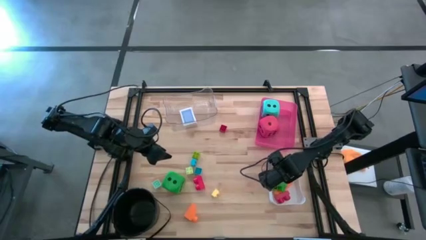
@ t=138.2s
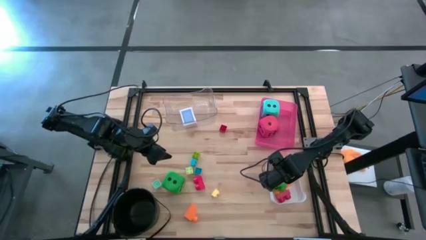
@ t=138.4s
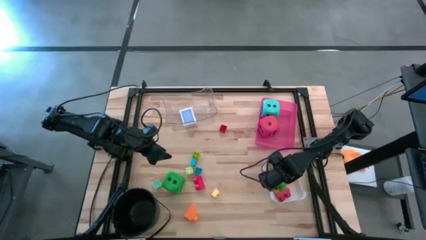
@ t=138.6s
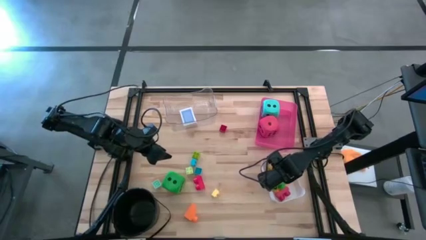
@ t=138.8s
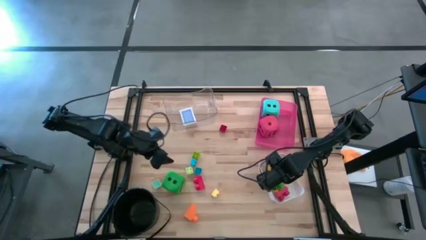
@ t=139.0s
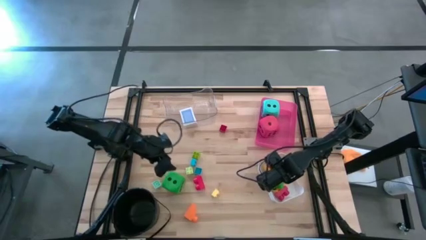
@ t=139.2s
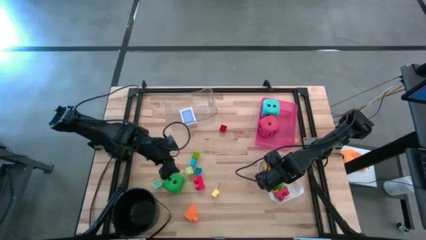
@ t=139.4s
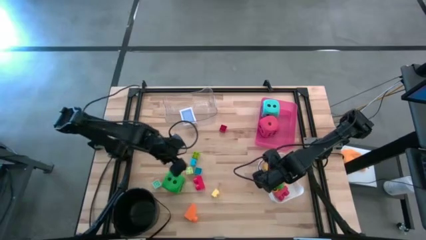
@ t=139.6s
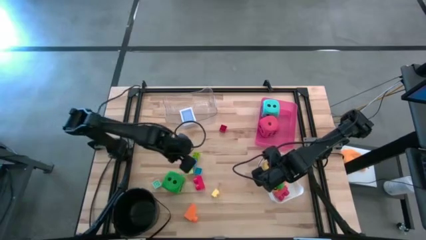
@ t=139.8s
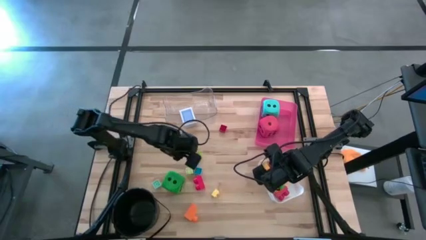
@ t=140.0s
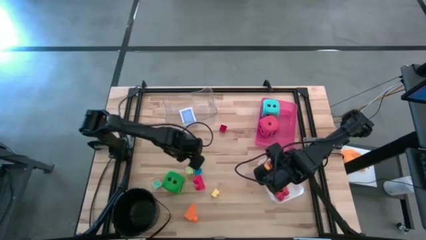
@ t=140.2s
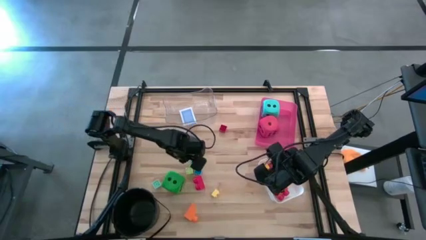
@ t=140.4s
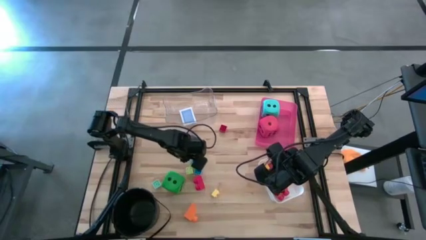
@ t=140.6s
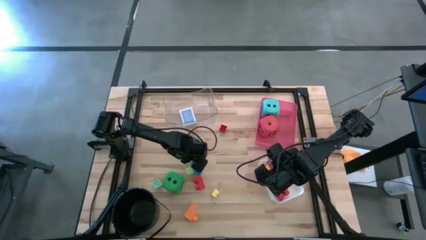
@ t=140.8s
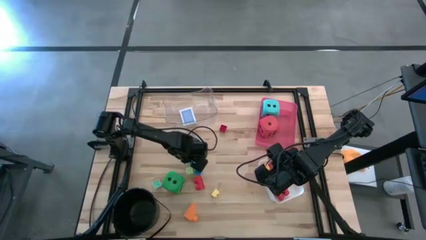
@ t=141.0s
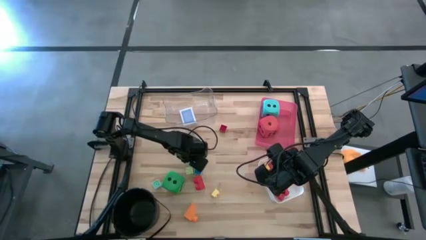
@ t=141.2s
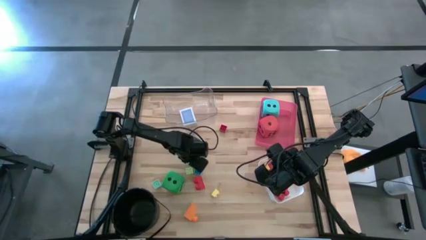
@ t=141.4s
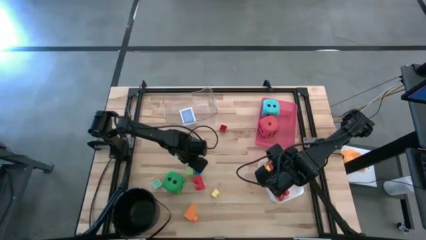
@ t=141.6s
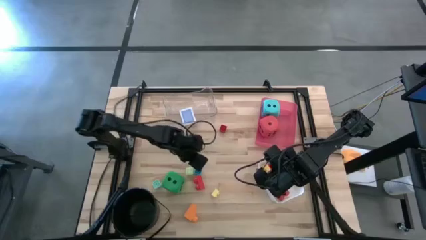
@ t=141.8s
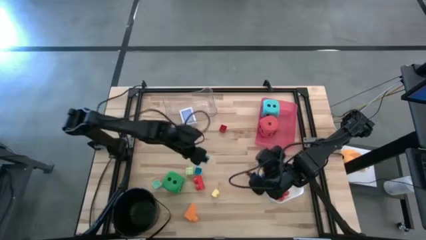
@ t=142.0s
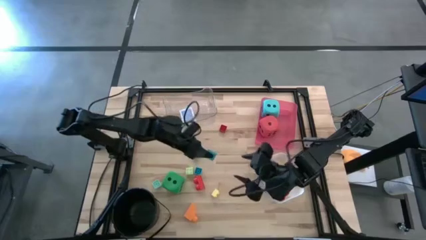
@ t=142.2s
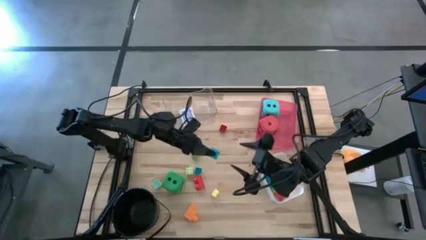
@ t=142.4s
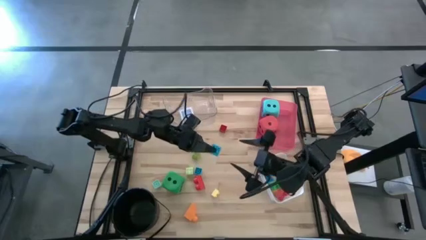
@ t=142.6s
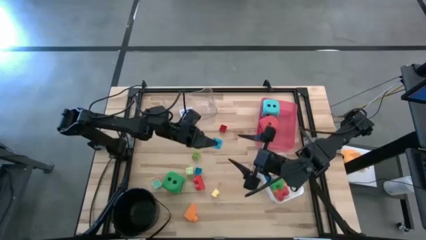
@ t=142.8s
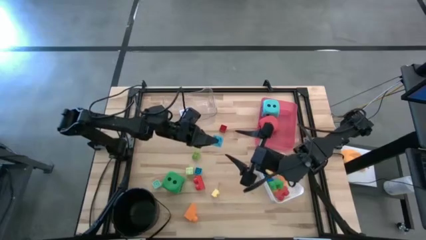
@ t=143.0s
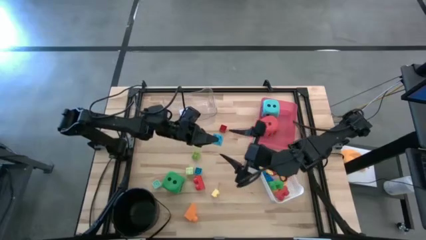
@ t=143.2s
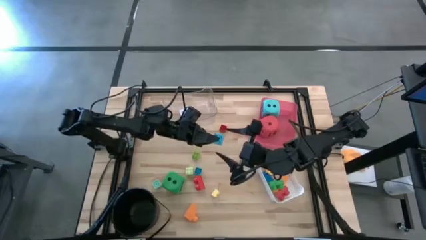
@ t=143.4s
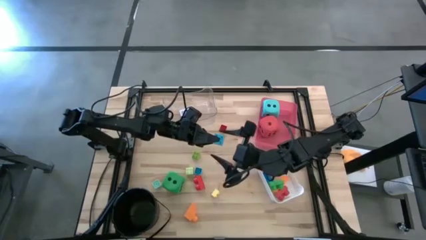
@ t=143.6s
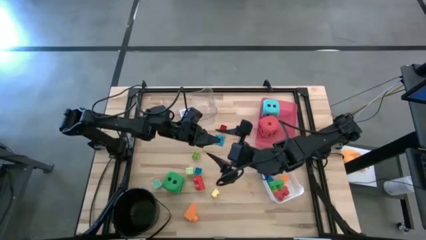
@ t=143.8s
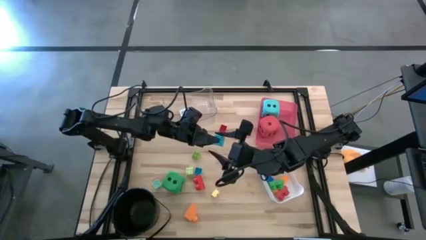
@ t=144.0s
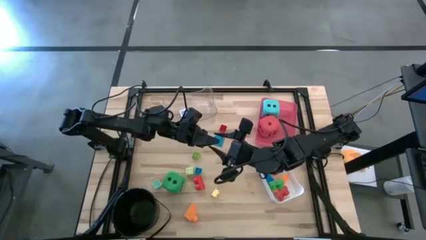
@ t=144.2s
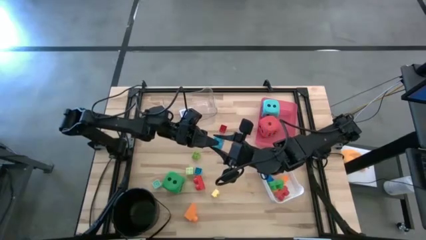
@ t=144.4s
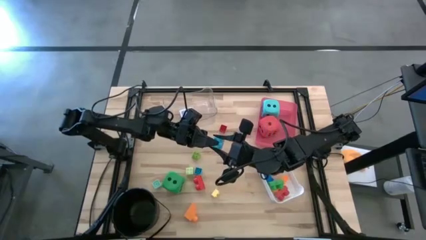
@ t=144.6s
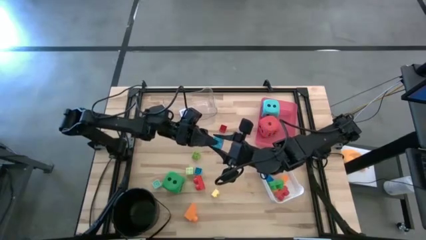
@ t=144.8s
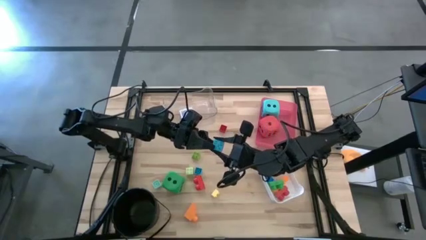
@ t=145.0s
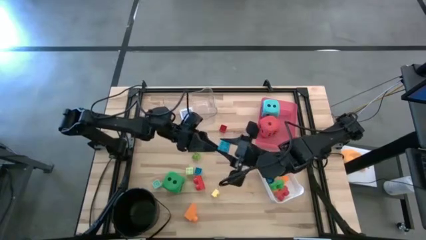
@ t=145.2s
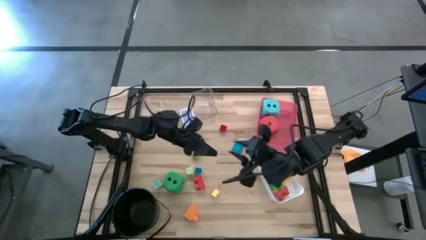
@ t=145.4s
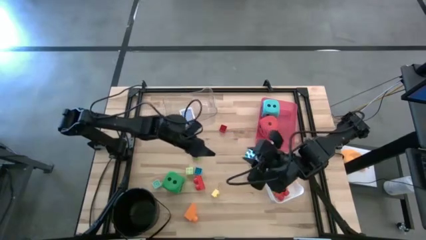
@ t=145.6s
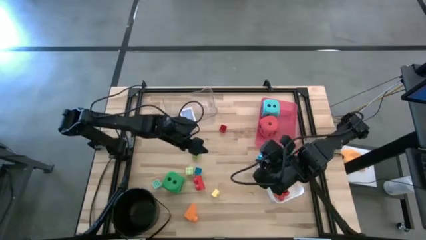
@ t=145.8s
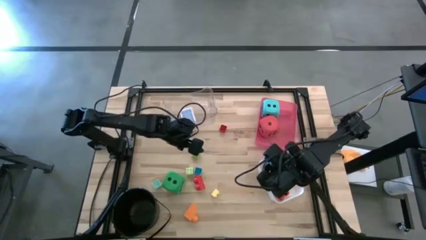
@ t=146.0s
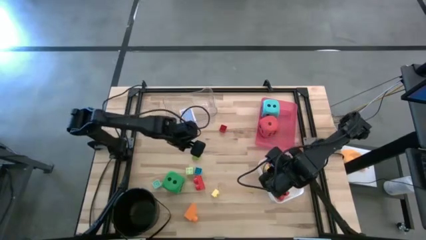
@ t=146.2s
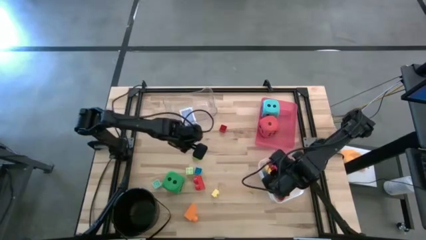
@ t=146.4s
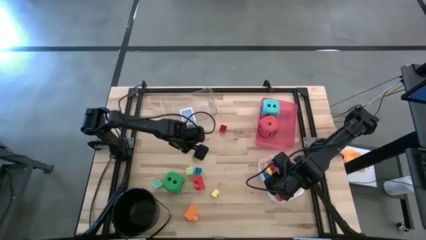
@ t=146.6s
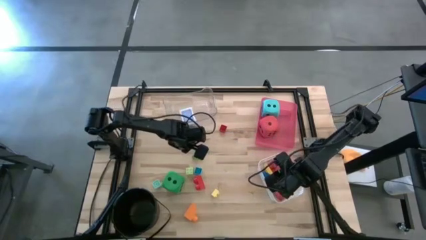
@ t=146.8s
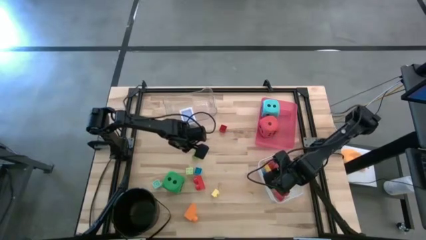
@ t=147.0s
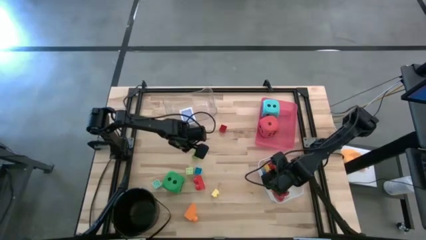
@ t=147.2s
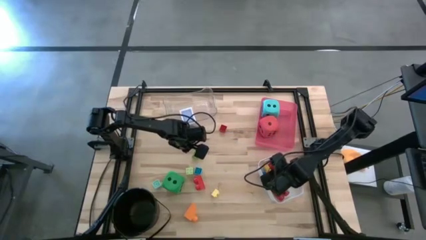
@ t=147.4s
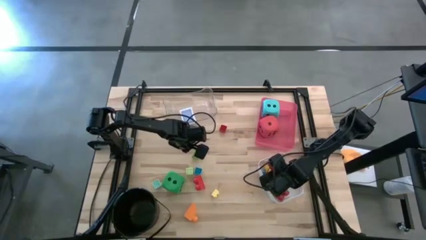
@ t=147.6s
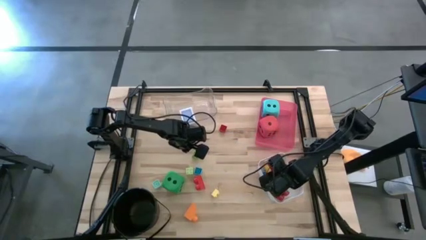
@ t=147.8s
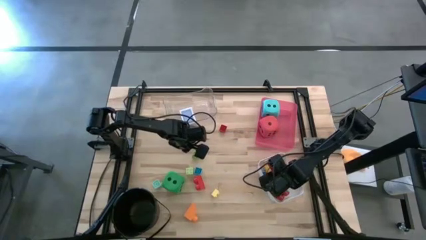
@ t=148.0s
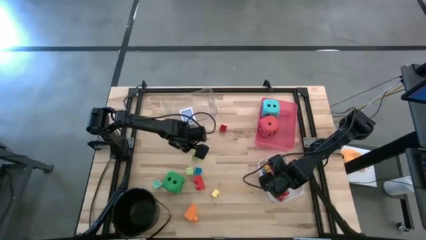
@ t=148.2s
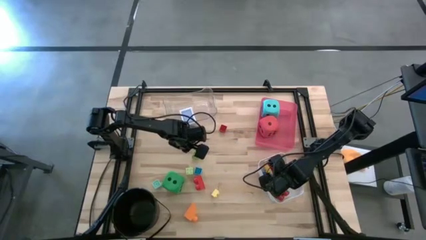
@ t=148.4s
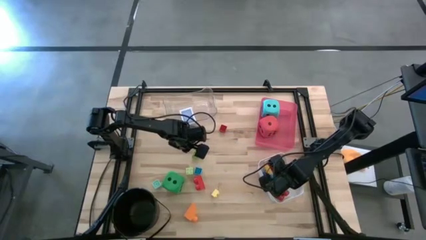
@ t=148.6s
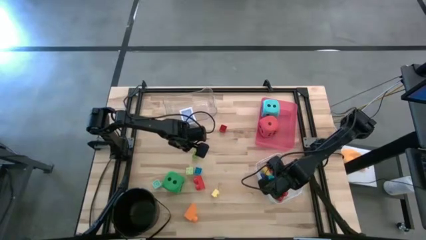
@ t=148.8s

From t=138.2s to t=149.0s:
Task: Pick & Place Toys
Put the blue game piece into the white bin
